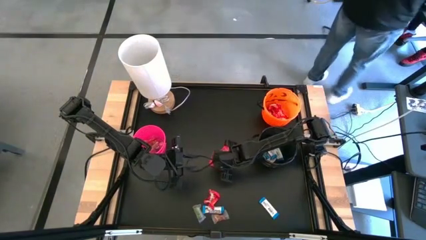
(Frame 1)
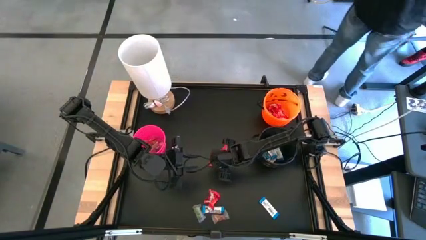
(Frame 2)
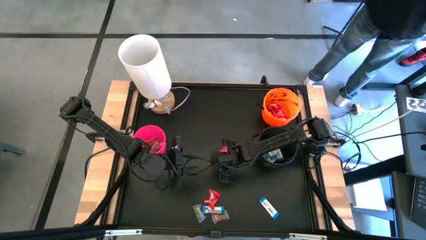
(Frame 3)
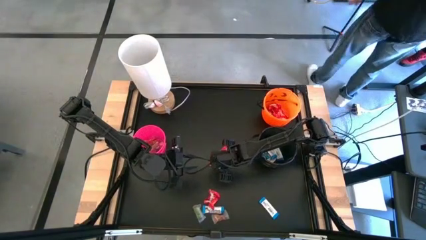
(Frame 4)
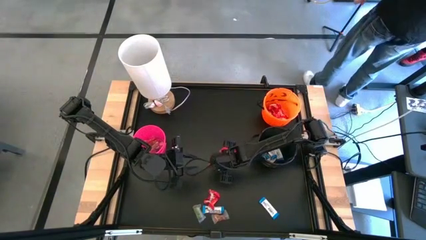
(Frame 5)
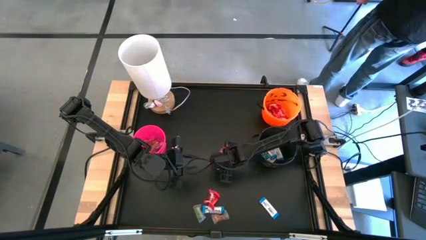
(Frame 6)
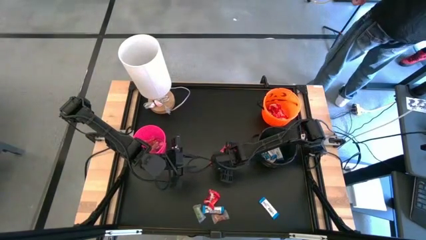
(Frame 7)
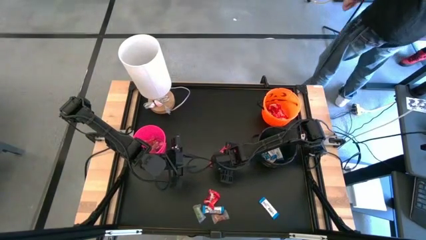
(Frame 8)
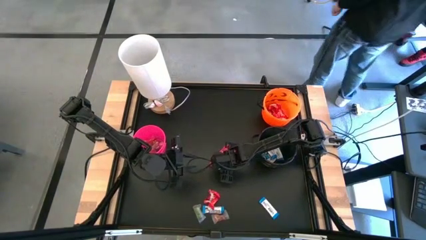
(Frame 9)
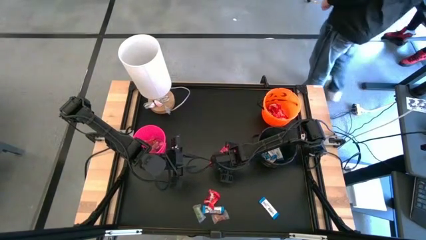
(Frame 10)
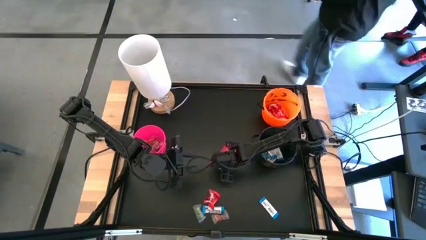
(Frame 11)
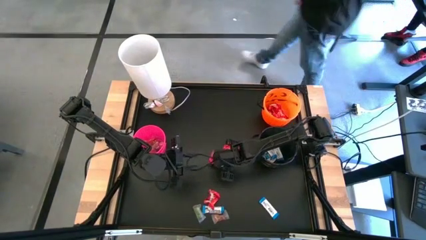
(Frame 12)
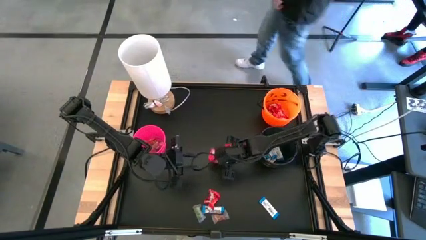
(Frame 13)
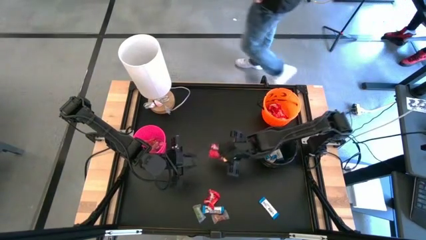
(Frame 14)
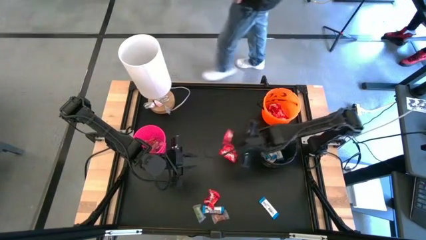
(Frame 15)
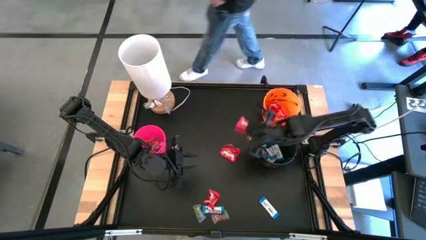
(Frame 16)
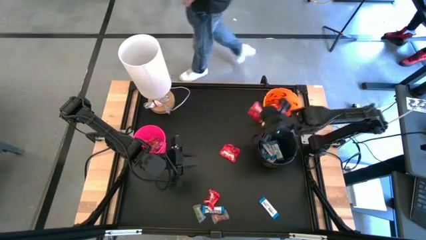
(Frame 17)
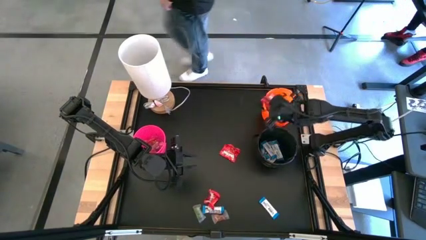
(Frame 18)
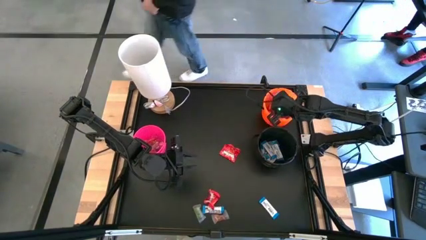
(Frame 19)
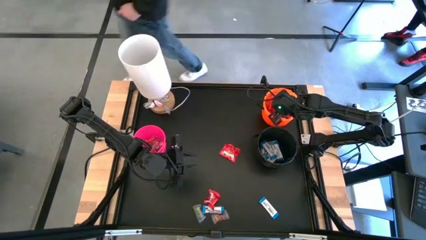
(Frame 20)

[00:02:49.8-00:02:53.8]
Task: Sort candy
Put the red candy into the orange bucket

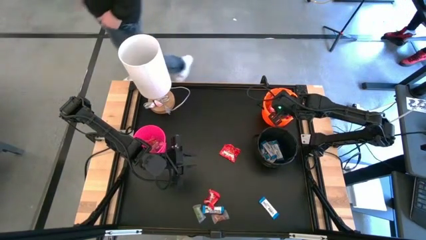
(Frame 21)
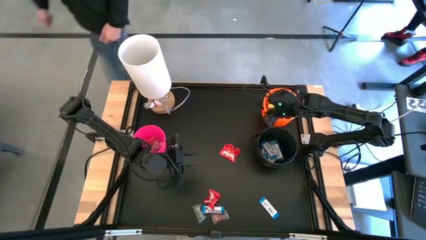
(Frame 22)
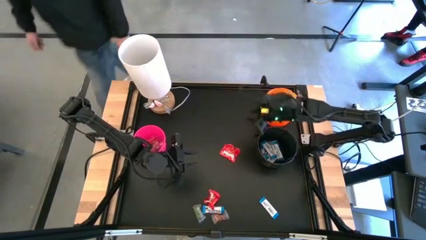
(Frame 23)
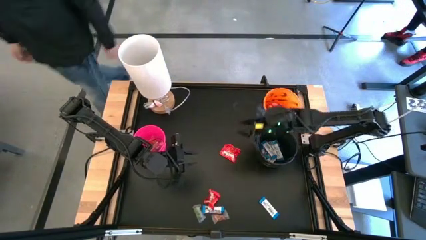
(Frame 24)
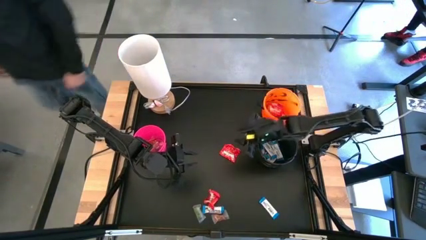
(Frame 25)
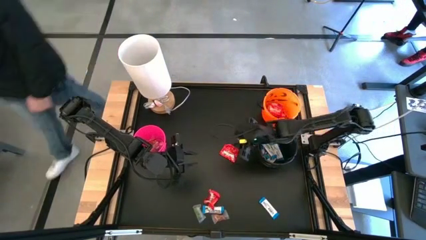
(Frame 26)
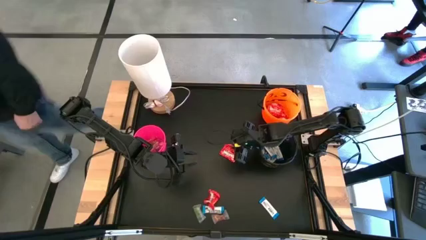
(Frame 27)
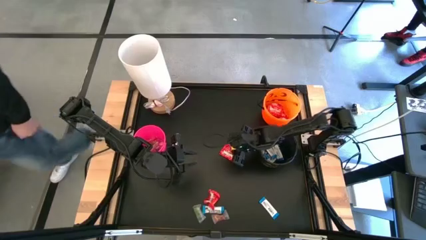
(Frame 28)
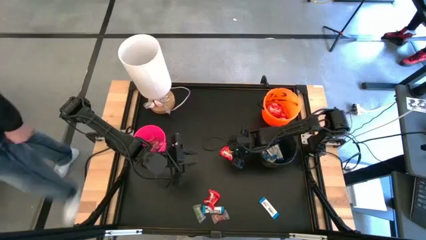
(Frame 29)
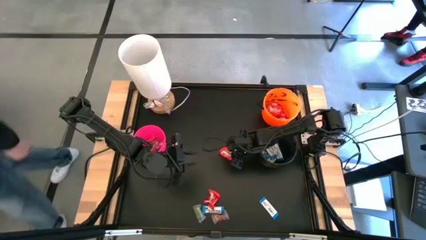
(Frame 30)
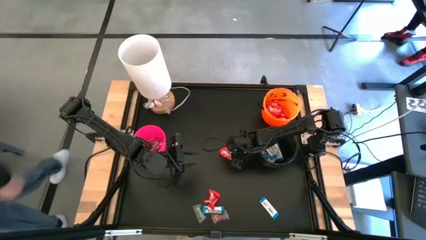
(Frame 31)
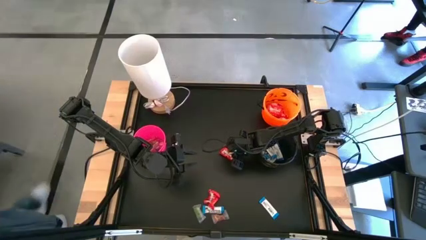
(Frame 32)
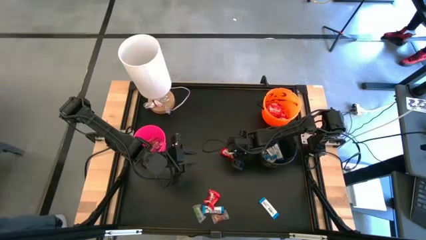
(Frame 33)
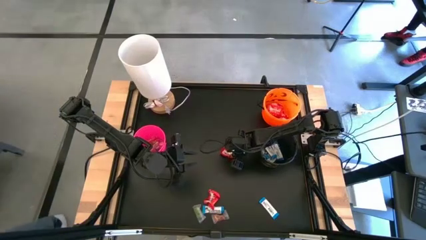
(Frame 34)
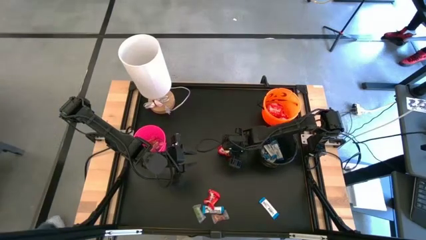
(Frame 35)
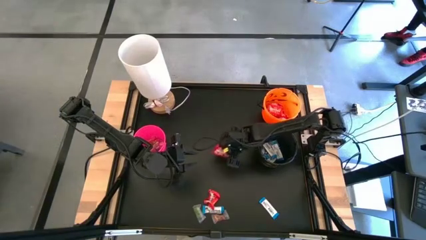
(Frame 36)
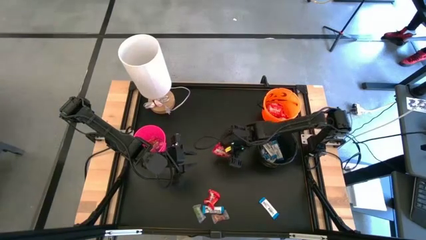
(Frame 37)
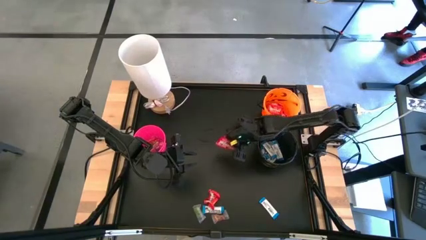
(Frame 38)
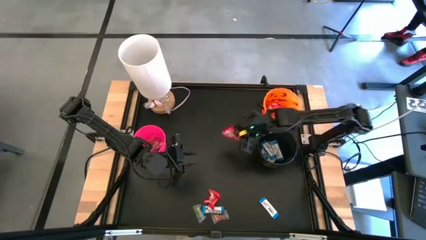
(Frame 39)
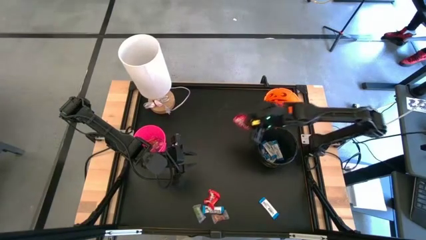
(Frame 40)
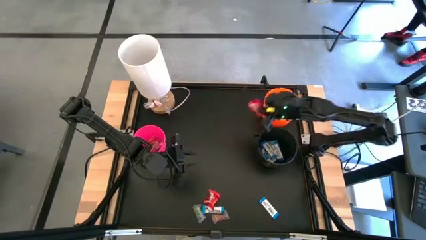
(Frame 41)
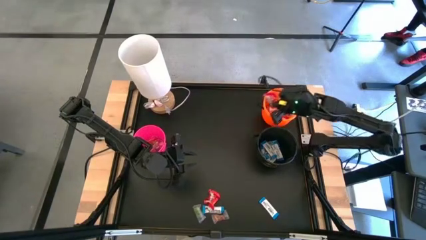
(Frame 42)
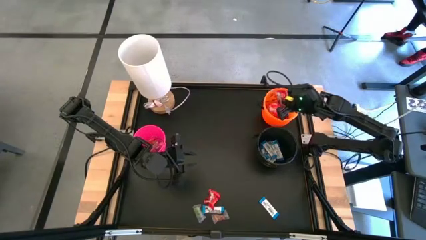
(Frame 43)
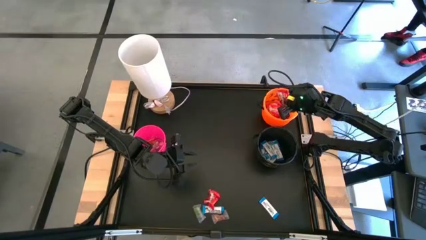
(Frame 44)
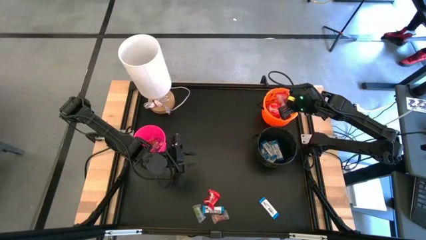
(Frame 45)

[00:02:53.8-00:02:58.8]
Put the red candy into the orange bucket

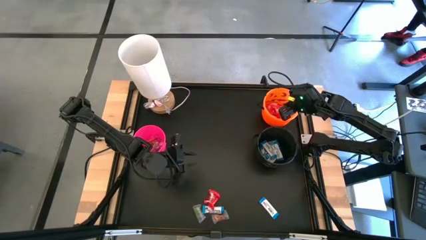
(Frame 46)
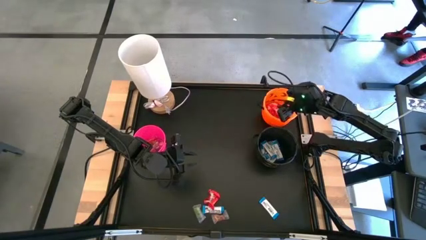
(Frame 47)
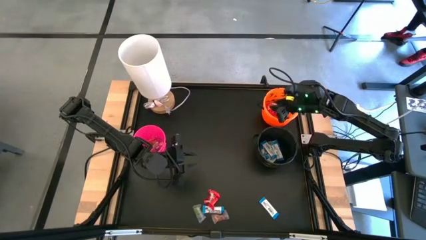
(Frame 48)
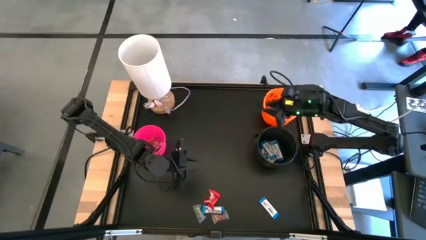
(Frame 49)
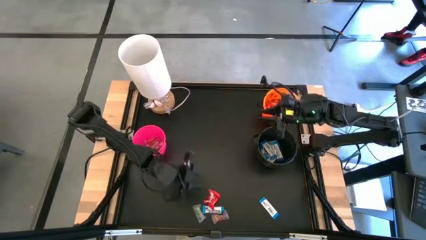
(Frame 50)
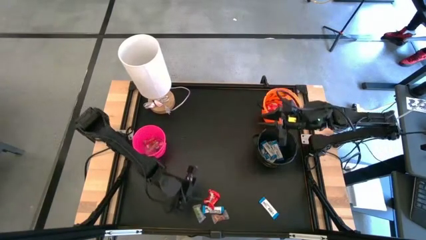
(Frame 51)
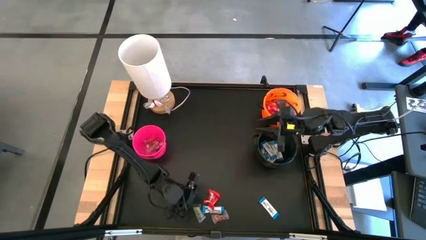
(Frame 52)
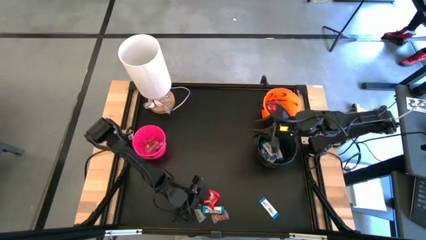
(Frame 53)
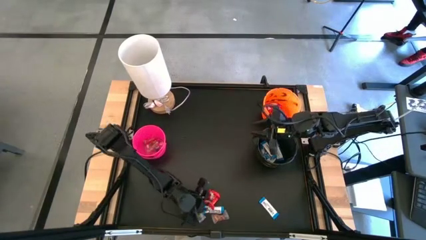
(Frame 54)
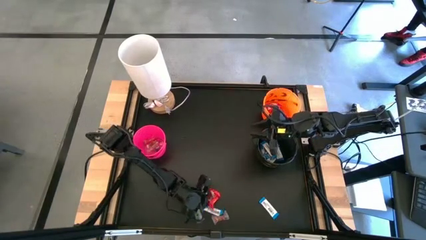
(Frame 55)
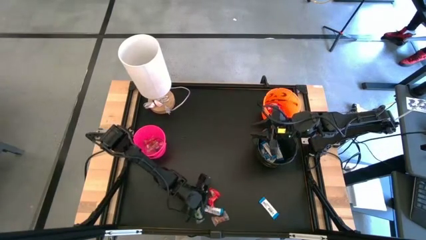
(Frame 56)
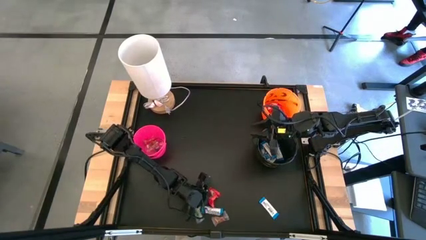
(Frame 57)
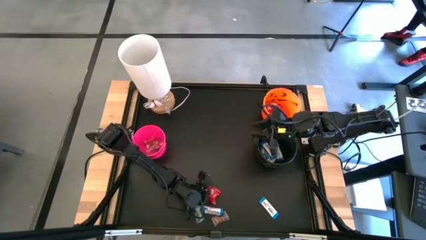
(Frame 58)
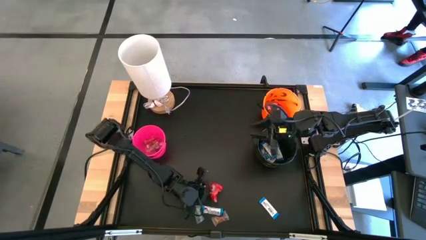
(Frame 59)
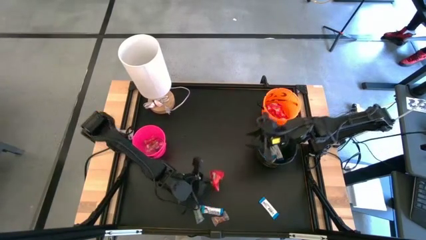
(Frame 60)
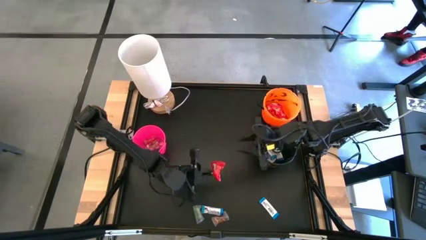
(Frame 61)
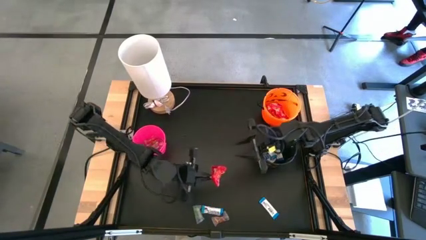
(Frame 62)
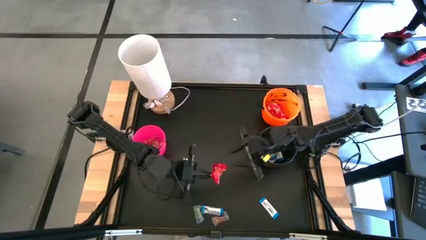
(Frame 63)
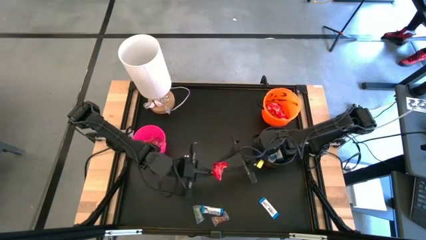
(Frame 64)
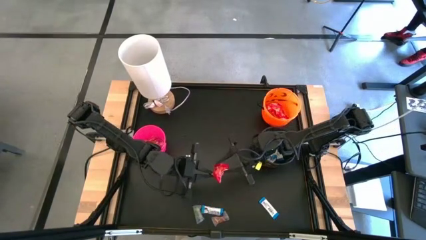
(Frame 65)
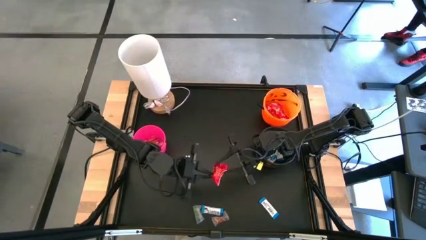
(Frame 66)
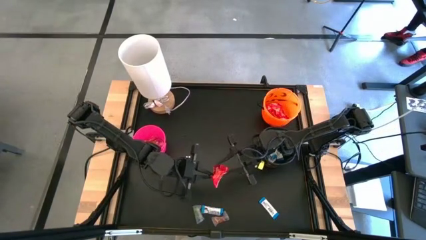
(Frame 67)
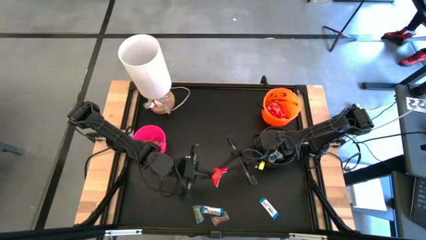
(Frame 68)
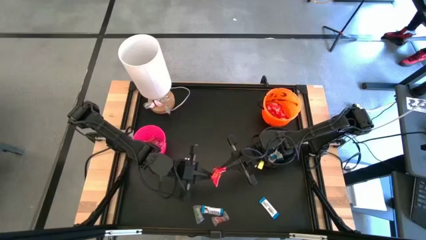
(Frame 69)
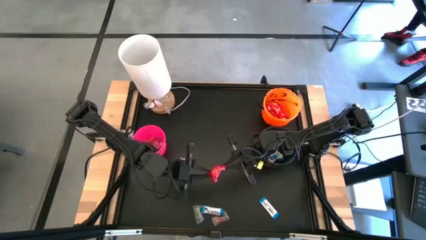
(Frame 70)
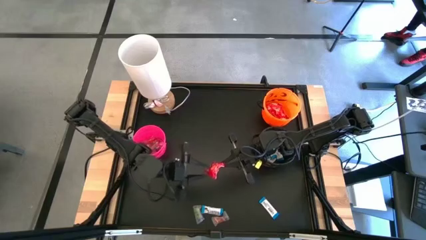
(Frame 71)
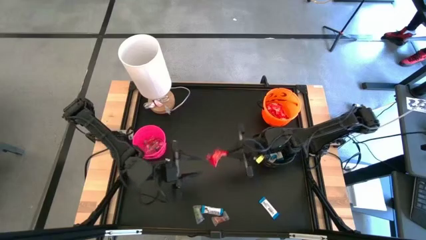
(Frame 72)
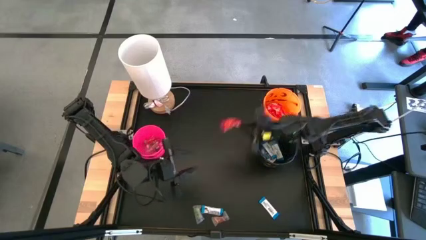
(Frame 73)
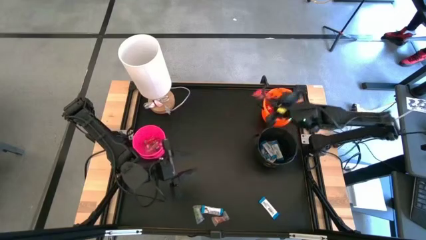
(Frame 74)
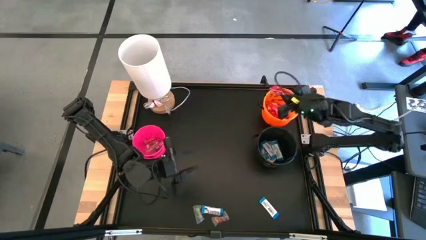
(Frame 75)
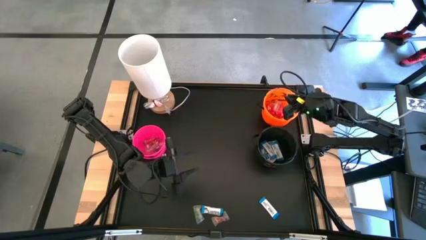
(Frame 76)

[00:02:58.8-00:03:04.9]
Put the red candy into the orange bucket

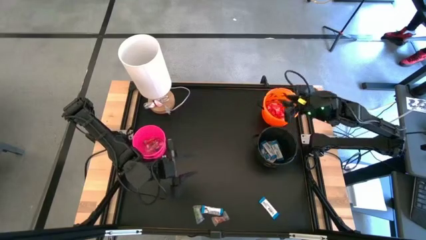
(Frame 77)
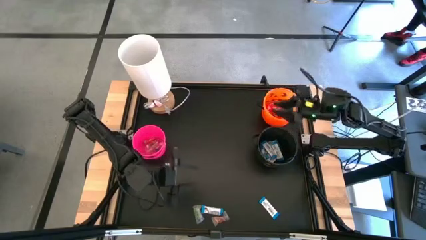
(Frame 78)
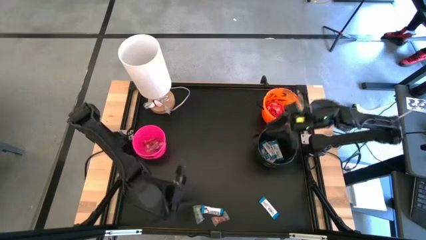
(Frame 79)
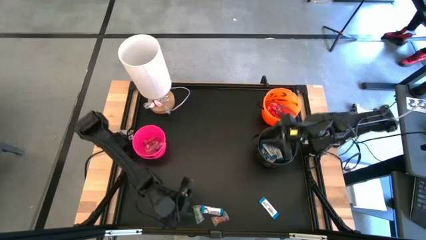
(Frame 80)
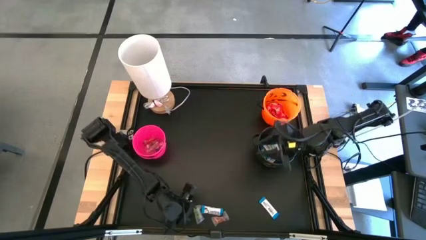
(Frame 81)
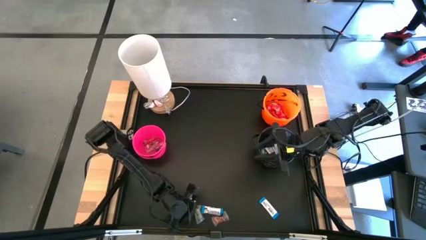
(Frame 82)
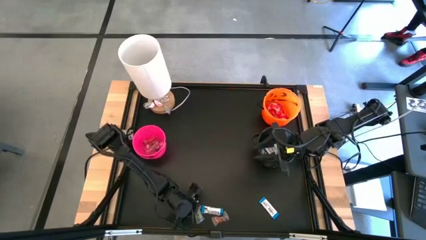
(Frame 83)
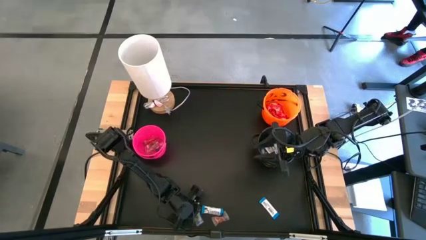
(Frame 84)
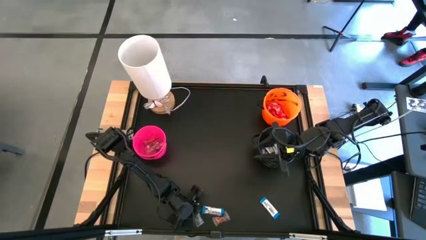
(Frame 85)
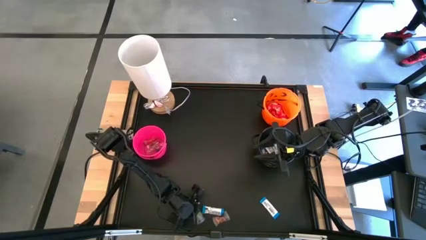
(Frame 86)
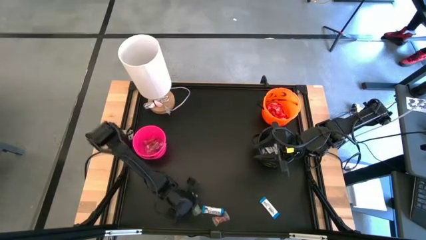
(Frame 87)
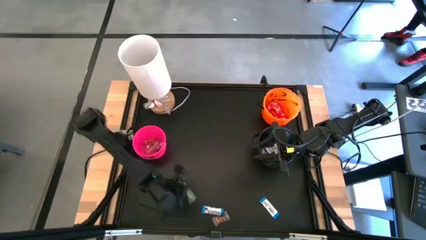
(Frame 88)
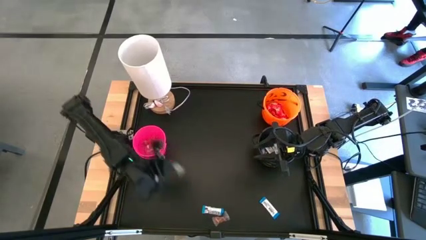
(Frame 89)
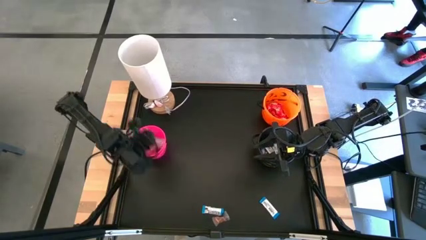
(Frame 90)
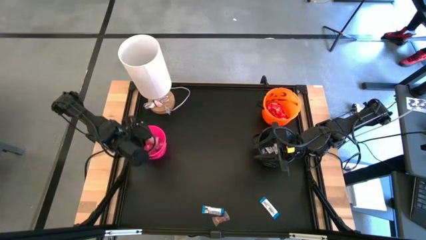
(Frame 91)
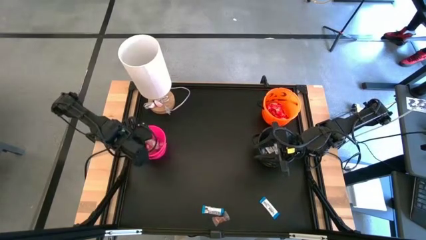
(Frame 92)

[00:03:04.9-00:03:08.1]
Put the green gummy into the pink bucket
